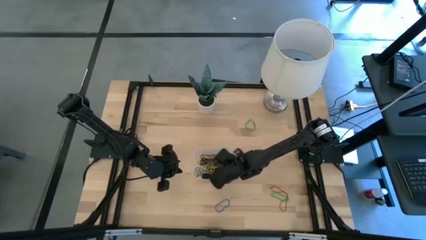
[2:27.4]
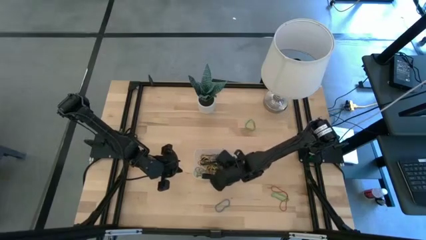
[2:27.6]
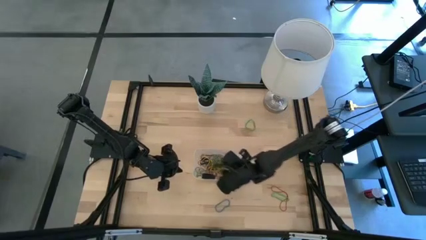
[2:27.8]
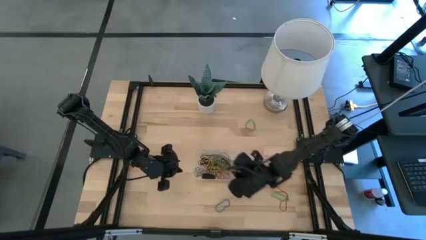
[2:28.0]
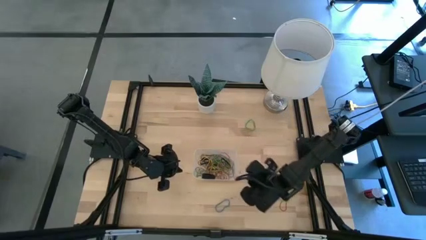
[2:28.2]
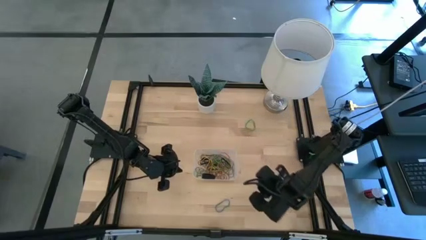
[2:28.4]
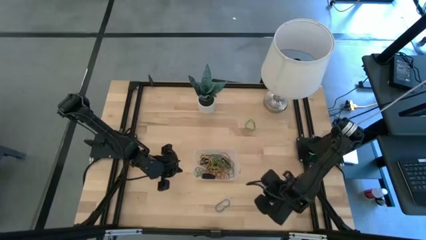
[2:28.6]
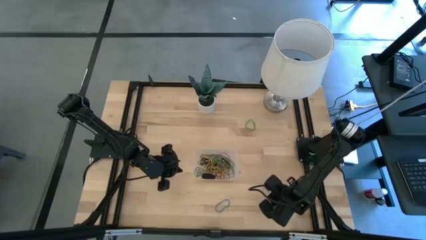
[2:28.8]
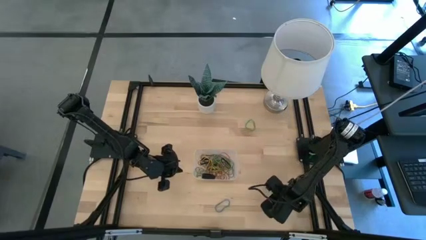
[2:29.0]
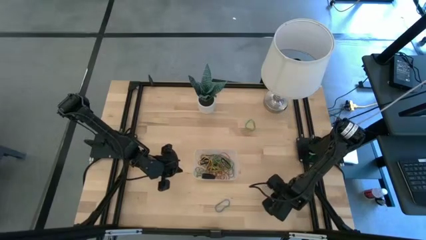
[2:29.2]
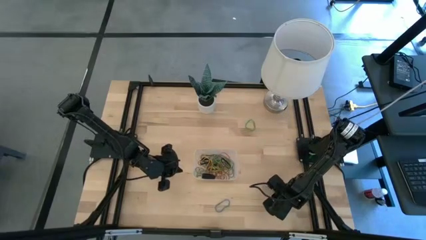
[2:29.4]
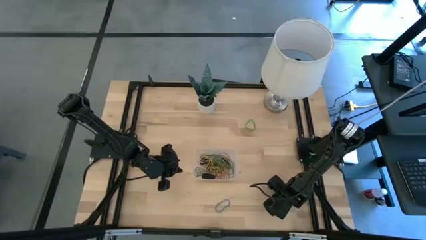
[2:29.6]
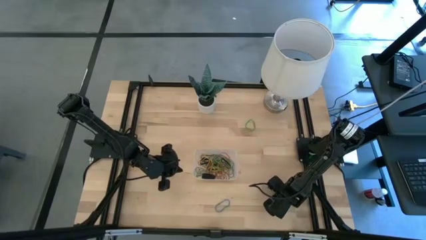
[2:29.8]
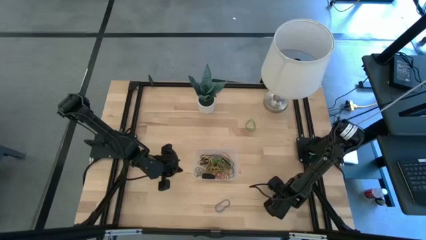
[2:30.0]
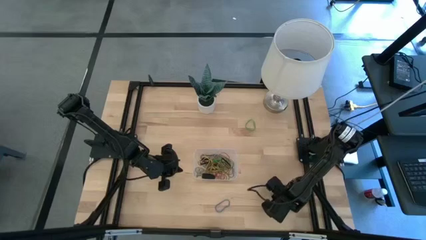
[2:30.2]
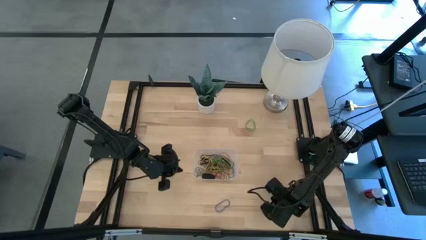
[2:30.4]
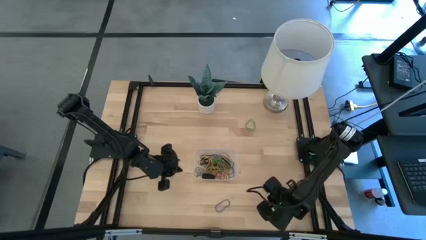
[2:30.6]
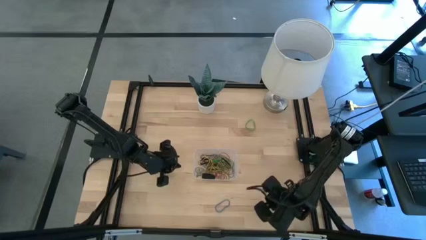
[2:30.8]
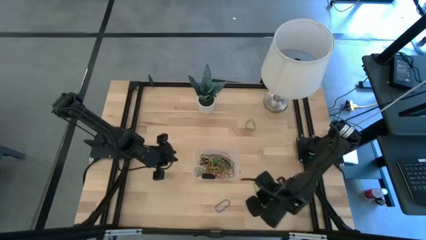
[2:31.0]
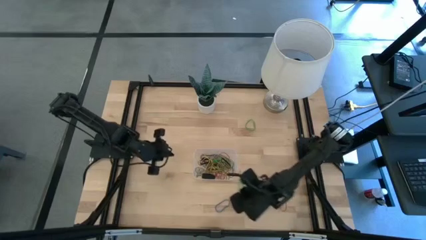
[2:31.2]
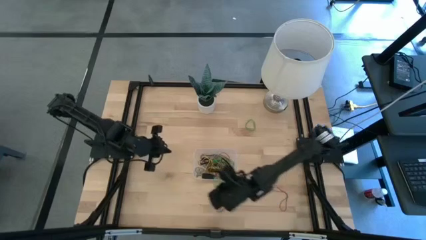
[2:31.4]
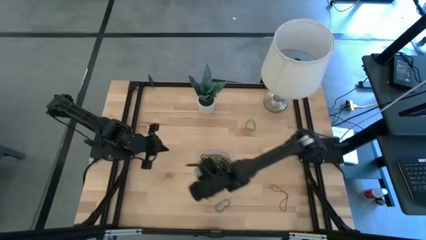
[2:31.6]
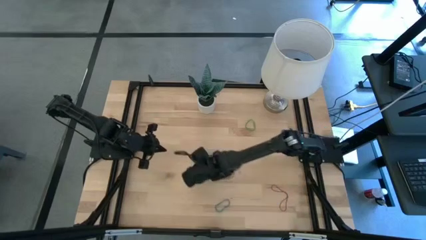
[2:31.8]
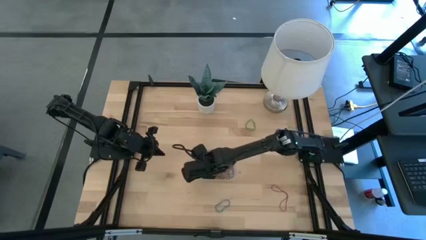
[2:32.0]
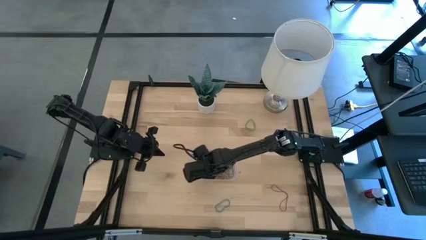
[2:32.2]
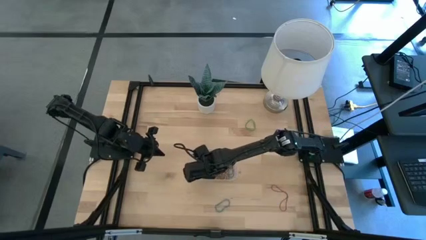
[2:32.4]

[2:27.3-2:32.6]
Task: Pick and place rubber bands into bin
Put the bottom green rubber band into the transparent bin

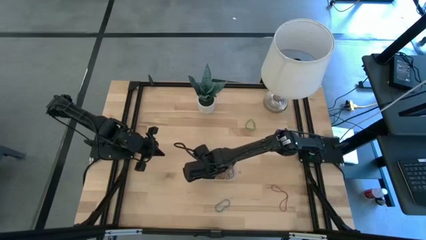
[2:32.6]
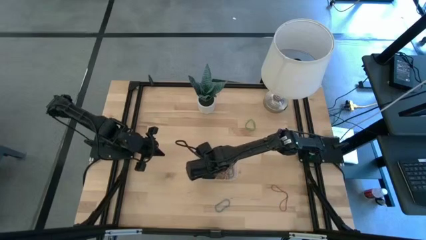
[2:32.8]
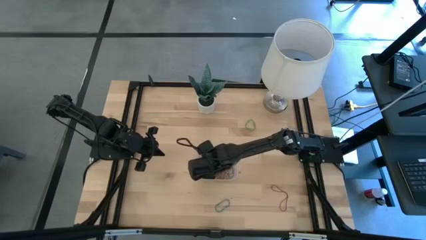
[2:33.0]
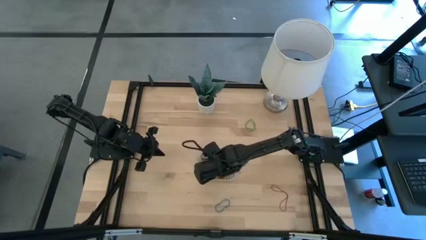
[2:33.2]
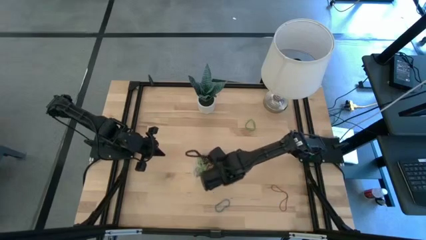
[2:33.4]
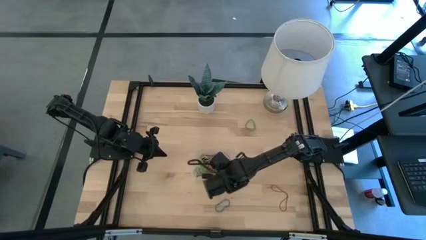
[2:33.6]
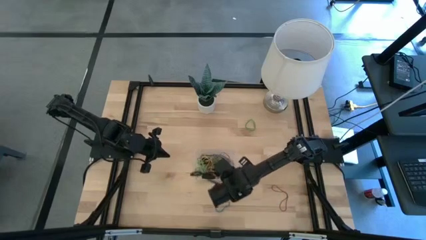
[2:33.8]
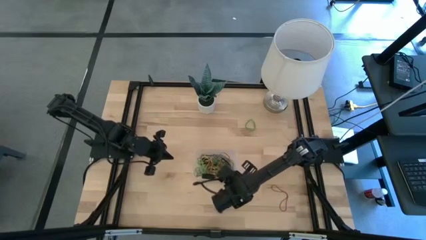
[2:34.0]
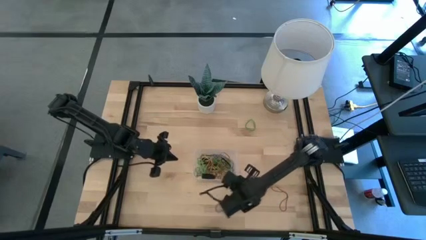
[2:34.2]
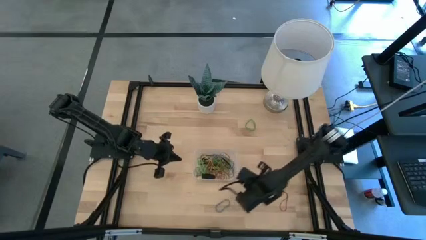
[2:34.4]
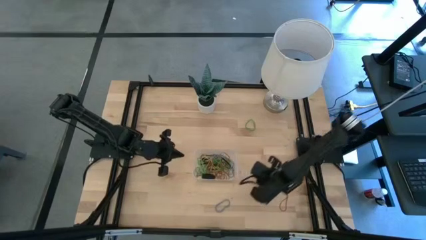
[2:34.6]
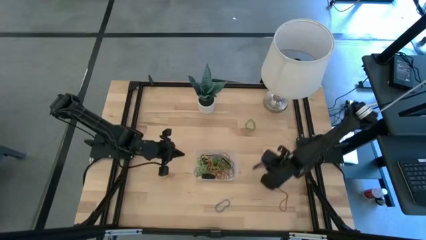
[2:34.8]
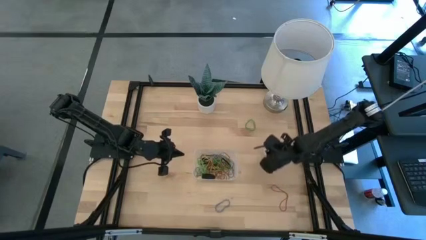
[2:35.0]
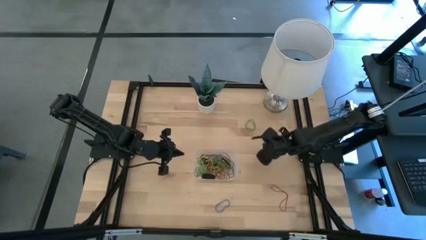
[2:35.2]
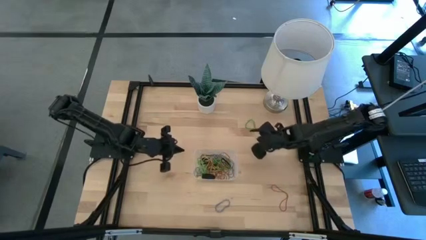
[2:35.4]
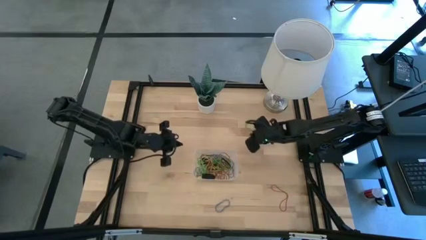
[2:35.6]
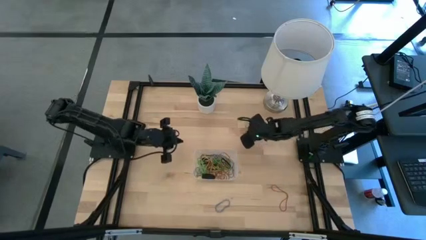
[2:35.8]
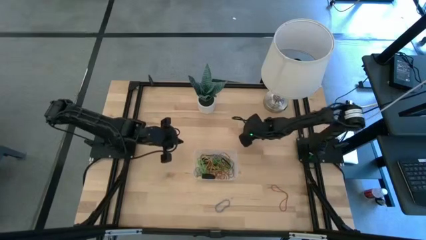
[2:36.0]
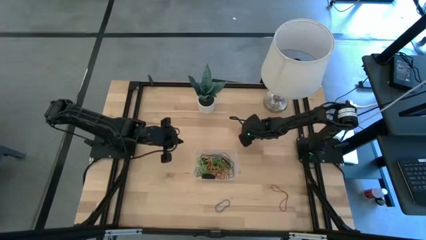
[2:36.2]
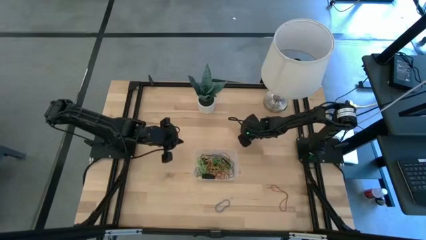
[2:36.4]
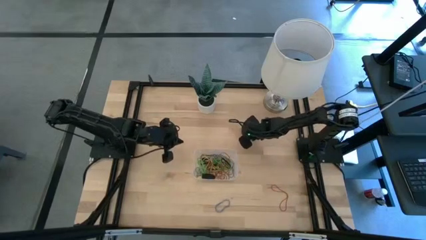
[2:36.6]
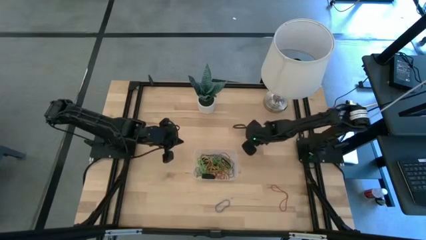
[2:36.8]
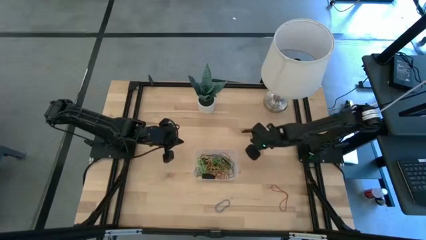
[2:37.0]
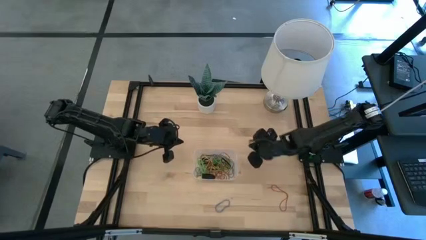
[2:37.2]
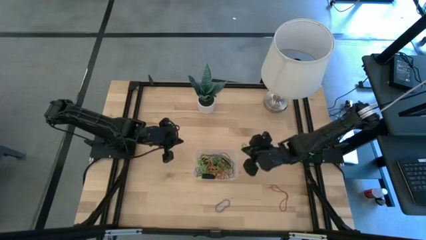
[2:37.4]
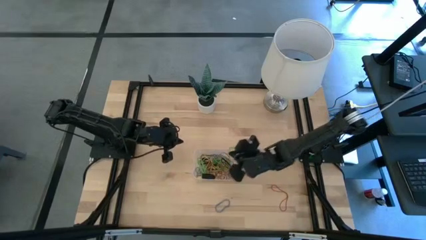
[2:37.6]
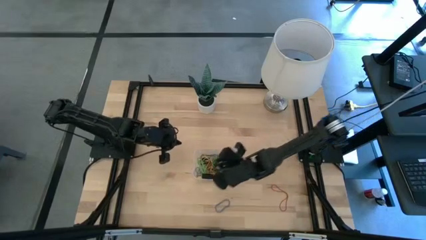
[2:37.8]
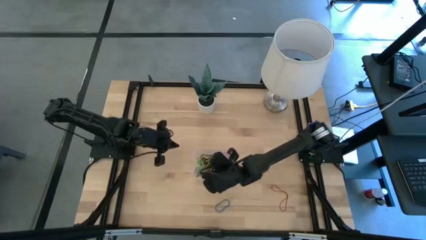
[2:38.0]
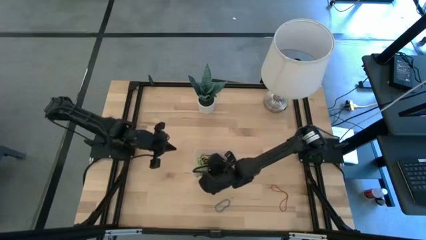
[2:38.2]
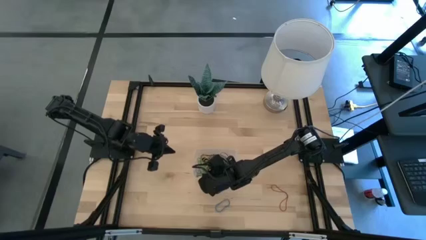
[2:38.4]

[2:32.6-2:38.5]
Put the green rubber band into the transparent bin

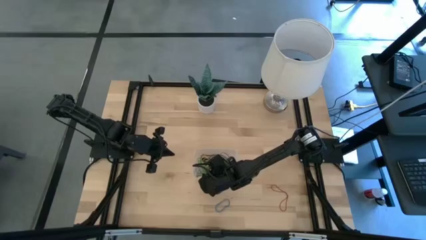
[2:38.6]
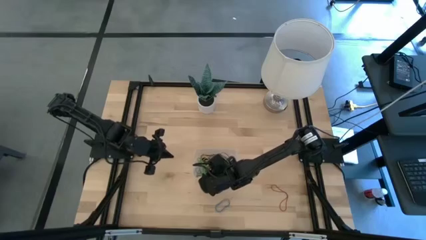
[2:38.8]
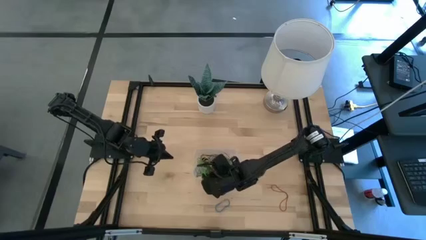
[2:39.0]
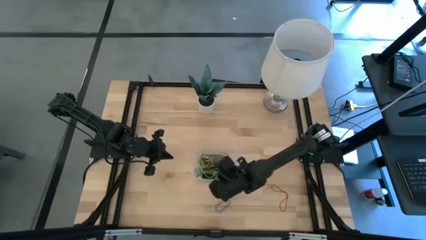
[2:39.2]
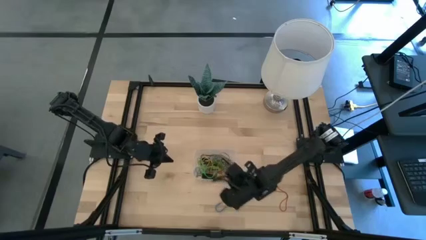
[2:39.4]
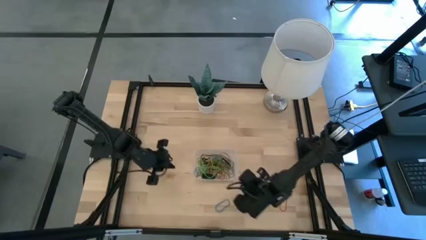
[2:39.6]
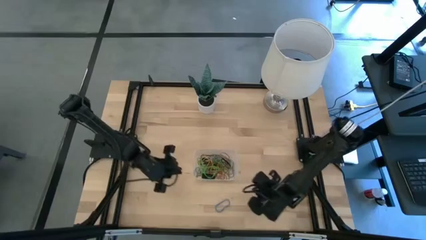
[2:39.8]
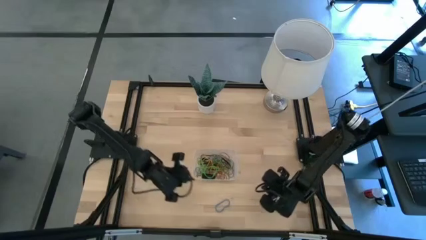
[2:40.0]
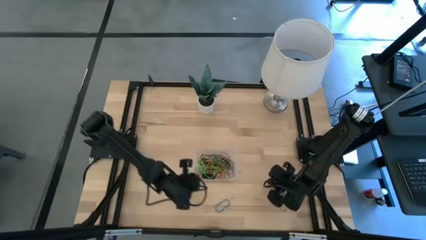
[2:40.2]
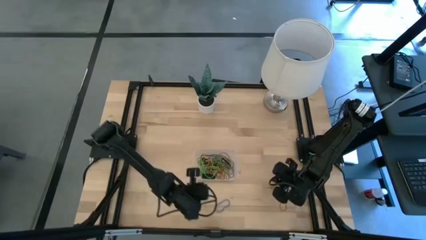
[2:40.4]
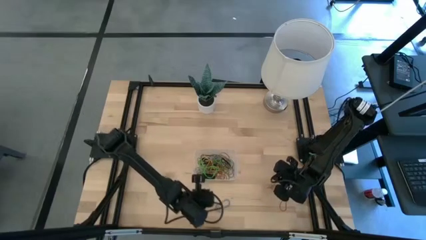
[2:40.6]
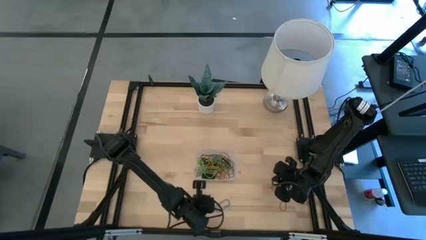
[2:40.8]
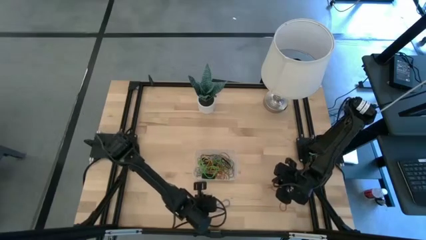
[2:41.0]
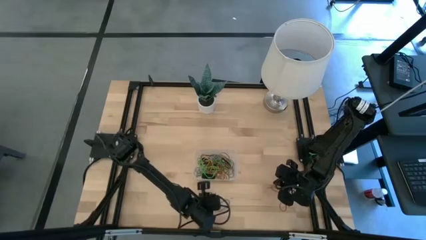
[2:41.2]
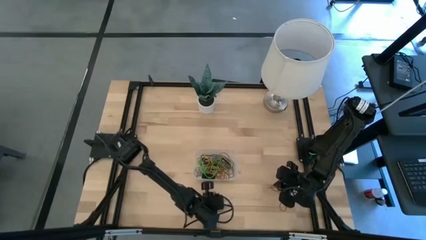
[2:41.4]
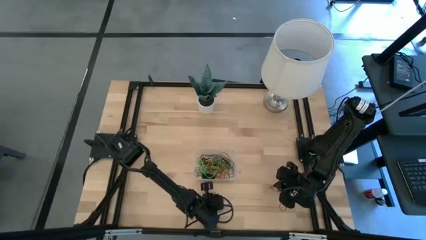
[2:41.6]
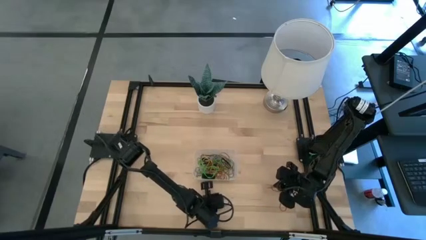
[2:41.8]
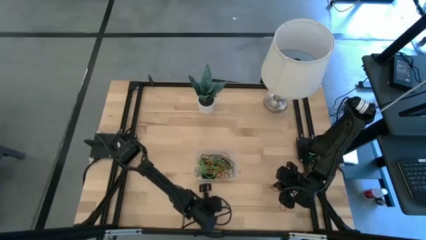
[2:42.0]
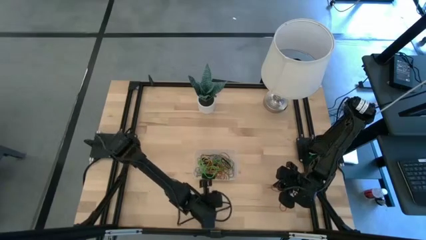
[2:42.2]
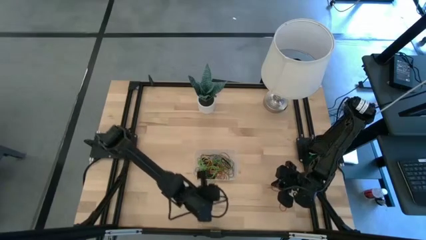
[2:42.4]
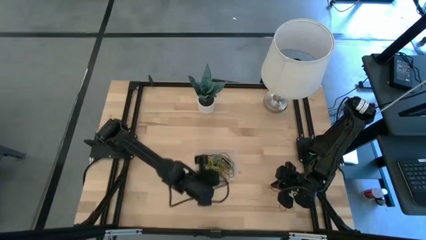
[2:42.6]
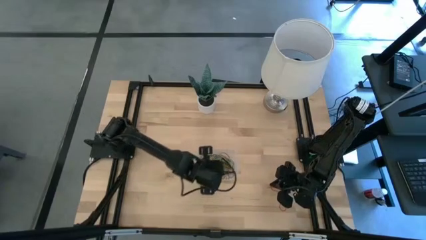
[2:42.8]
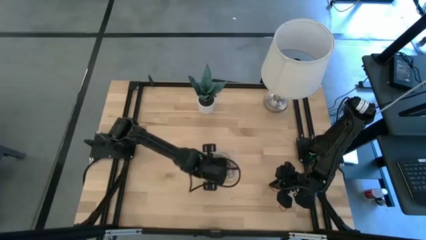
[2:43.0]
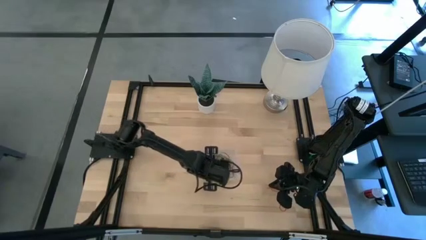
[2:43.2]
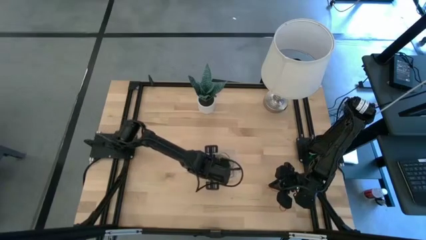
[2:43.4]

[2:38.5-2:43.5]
Put the blue rubber band into the transparent bin
